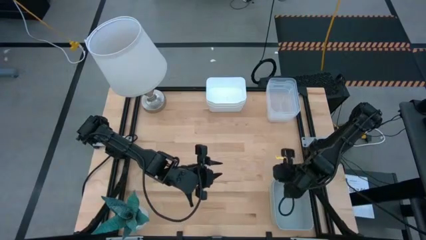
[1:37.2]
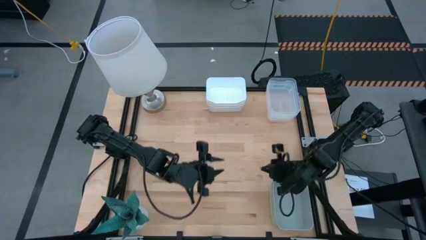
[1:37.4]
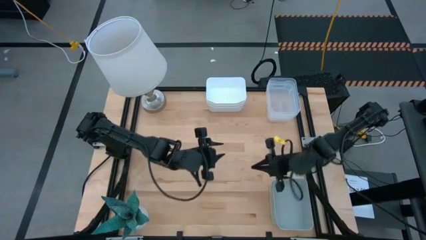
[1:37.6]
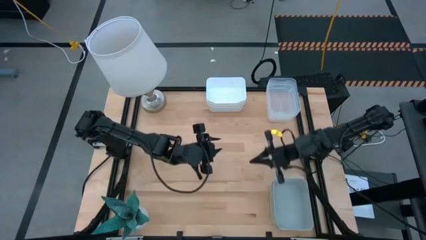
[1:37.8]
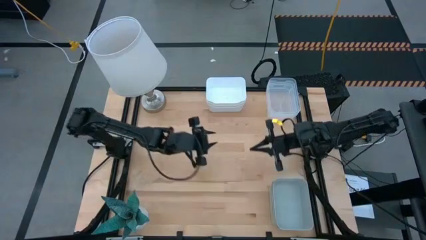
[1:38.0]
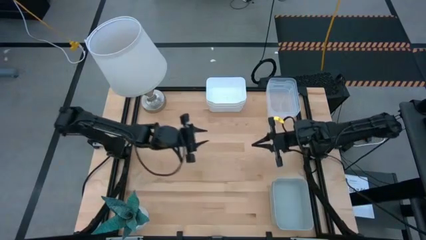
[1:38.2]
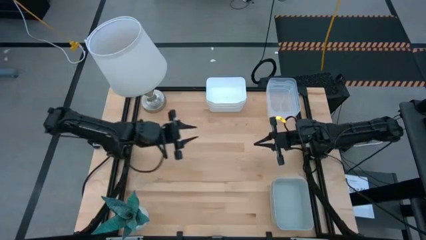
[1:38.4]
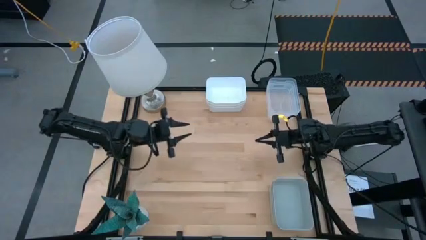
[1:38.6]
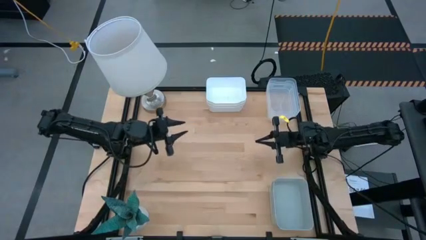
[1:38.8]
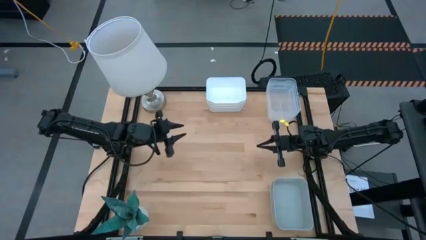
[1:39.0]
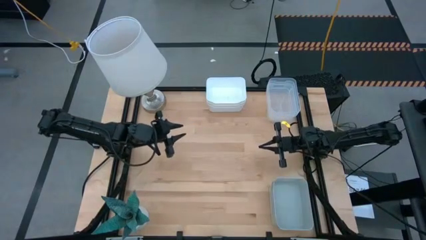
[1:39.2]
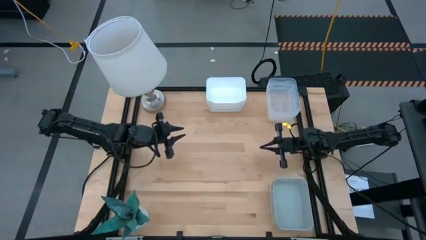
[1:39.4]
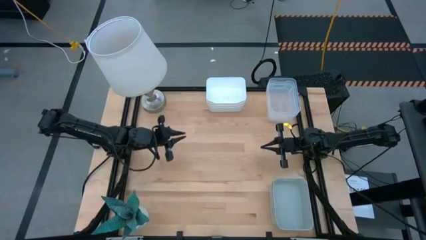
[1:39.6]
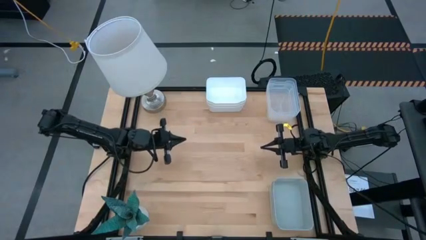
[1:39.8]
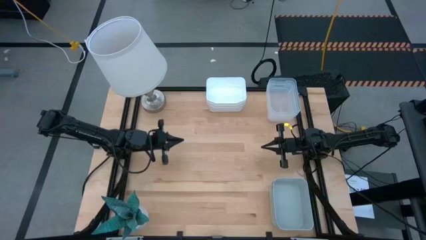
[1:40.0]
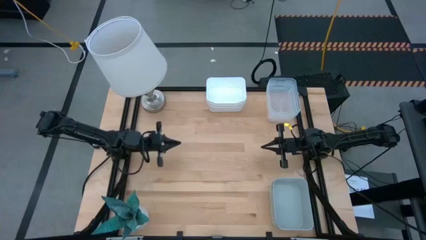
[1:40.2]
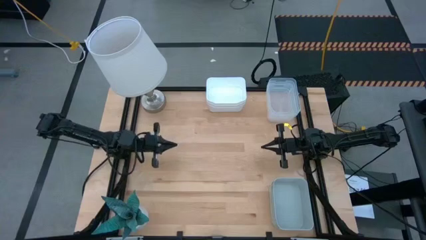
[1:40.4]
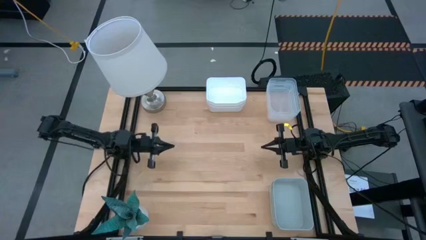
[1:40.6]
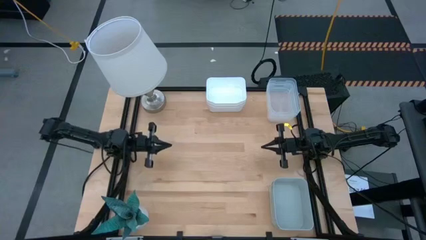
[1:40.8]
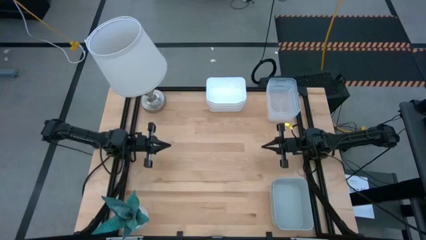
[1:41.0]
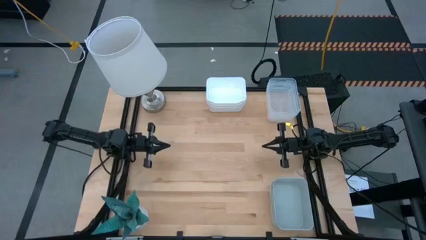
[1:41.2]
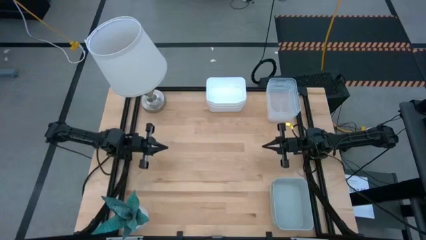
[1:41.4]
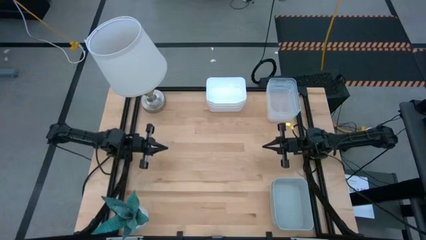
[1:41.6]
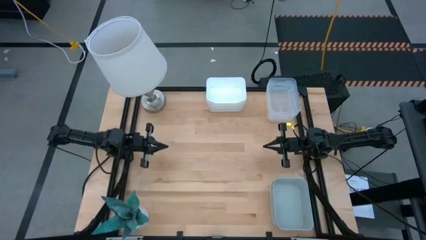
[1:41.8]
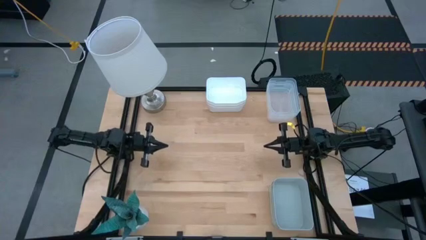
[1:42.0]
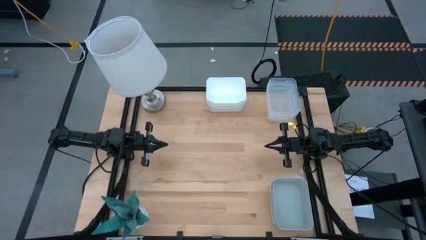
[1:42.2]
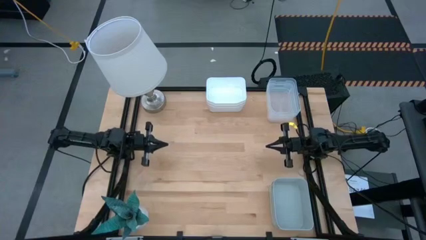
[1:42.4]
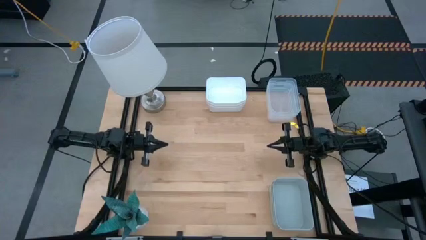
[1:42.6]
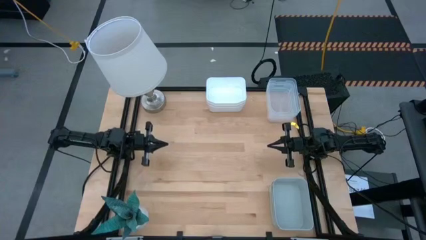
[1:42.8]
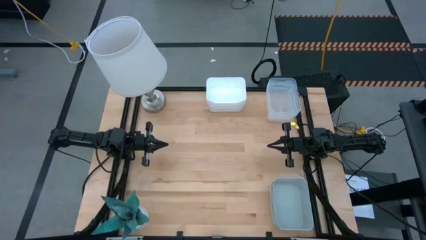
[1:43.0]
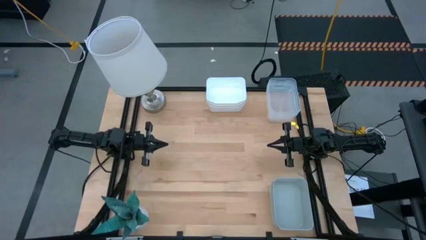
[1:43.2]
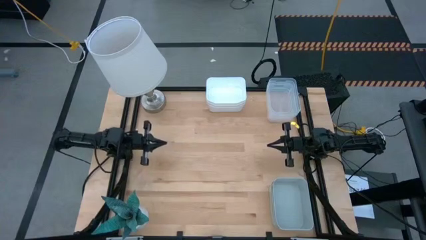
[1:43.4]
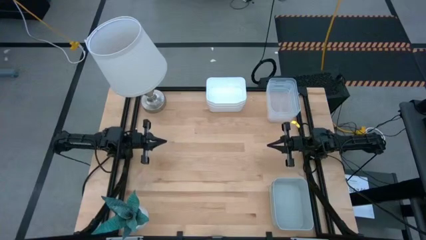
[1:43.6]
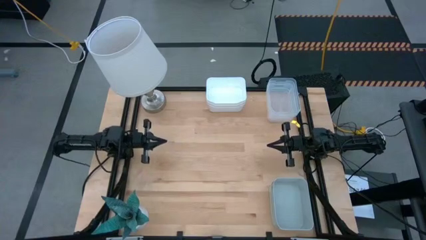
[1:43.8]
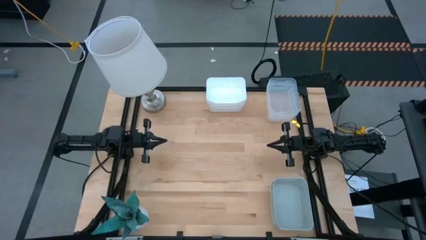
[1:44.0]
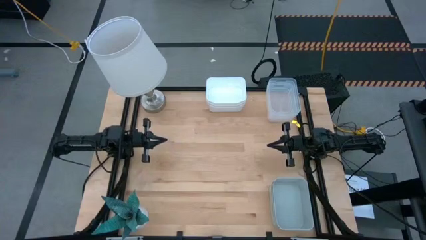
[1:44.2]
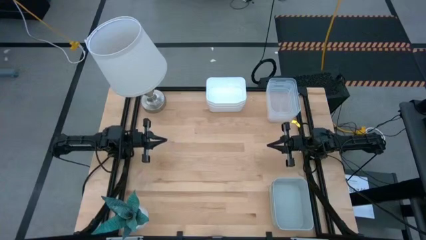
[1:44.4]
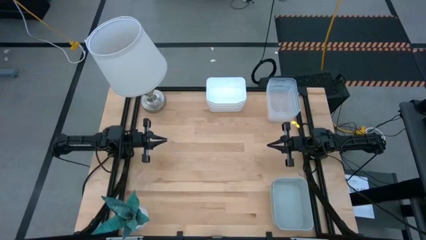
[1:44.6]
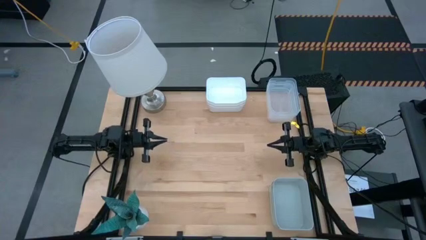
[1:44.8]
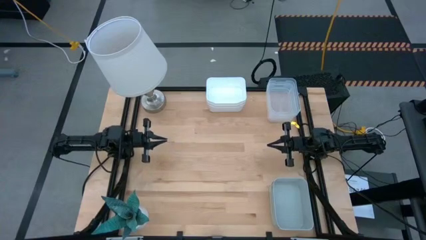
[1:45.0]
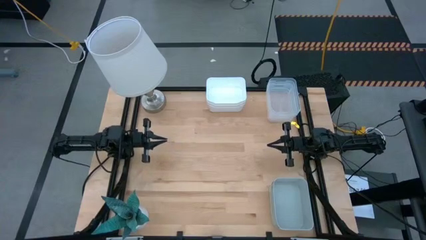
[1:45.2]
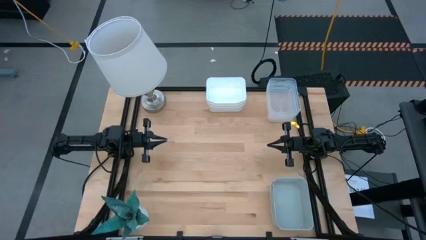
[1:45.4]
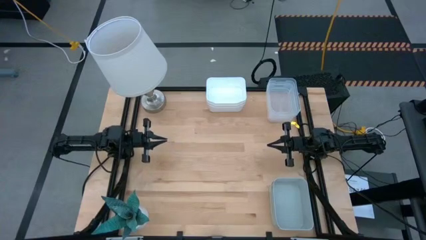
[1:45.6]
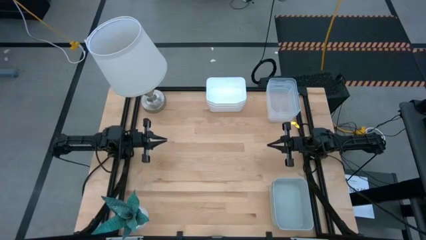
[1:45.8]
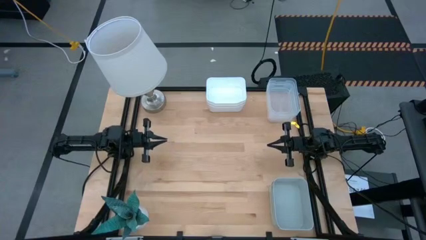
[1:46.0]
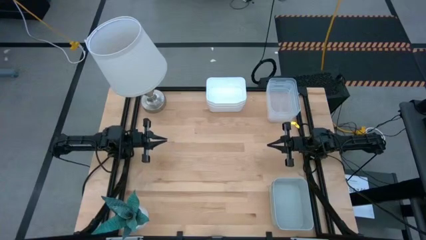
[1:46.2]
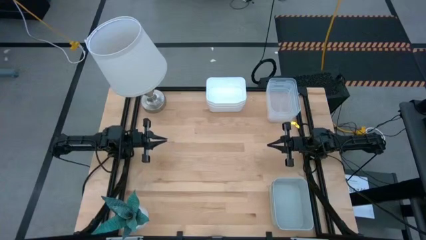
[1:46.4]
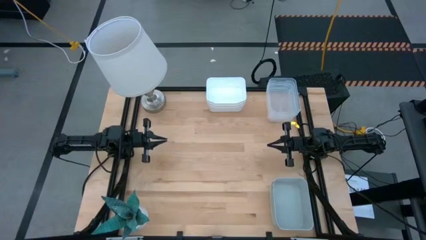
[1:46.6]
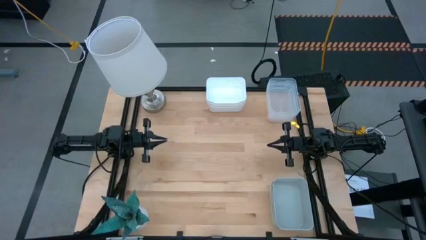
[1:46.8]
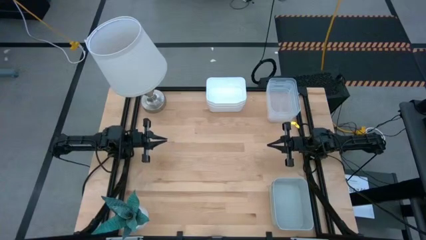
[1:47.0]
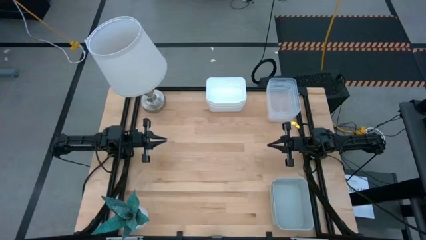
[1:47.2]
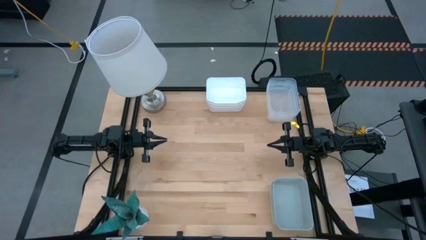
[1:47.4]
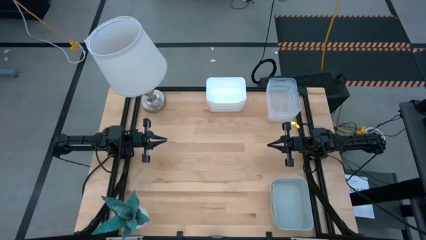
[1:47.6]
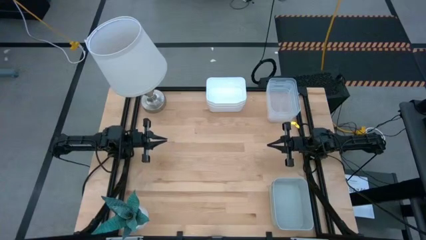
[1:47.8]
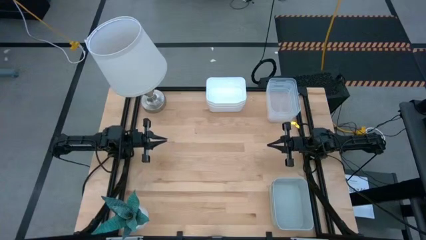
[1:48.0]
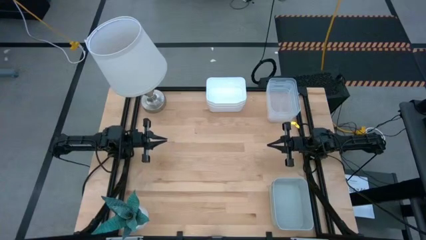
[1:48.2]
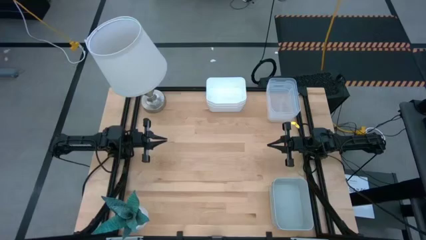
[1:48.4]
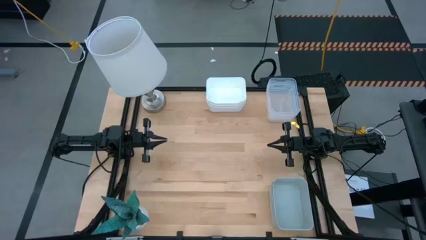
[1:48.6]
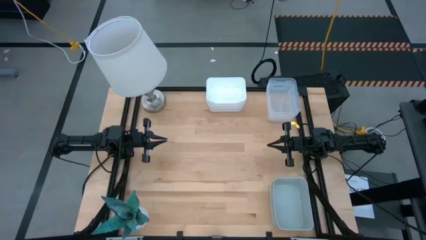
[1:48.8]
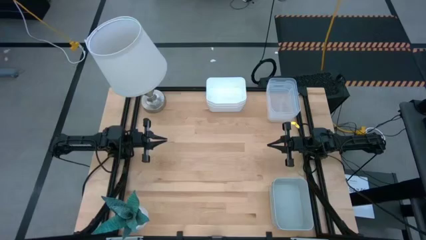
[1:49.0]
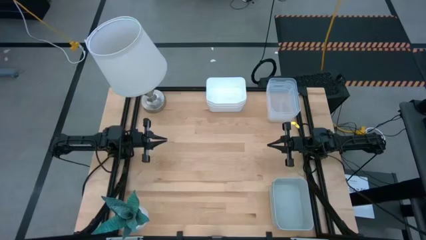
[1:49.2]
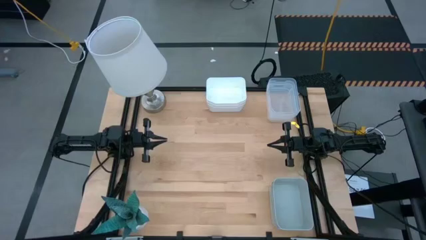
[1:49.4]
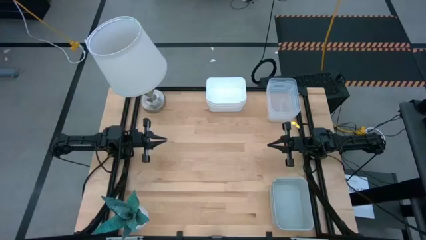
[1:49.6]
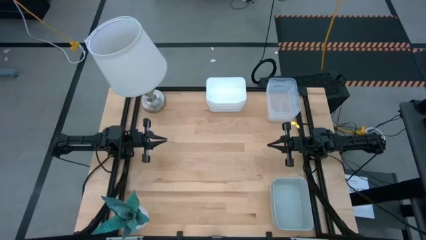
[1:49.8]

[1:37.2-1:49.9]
Return to Home Position
